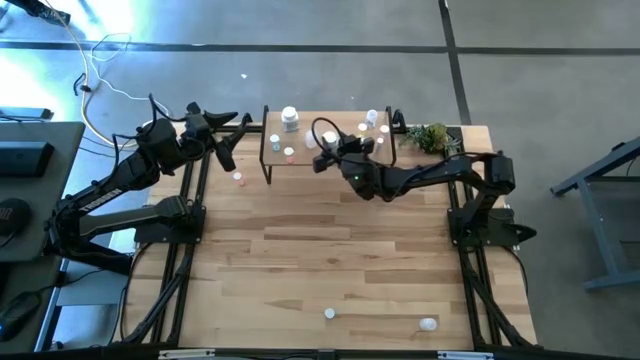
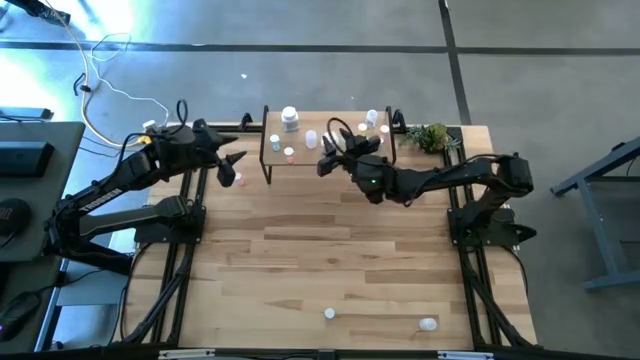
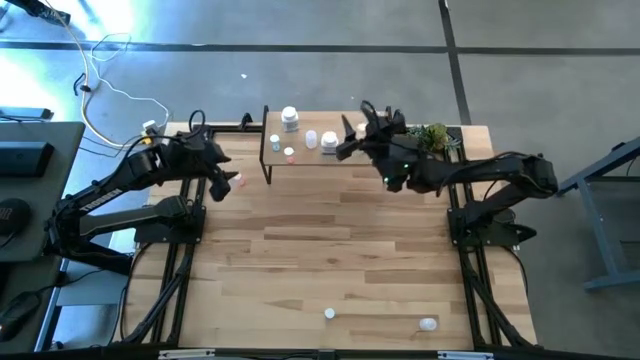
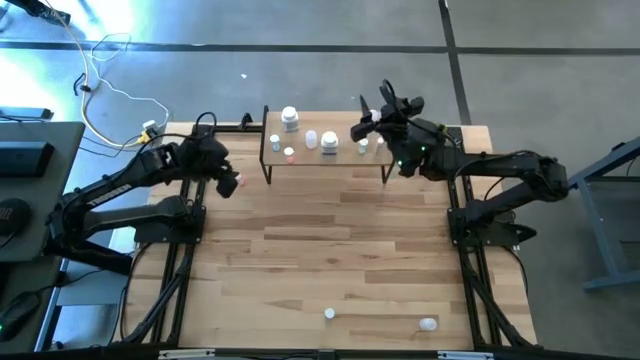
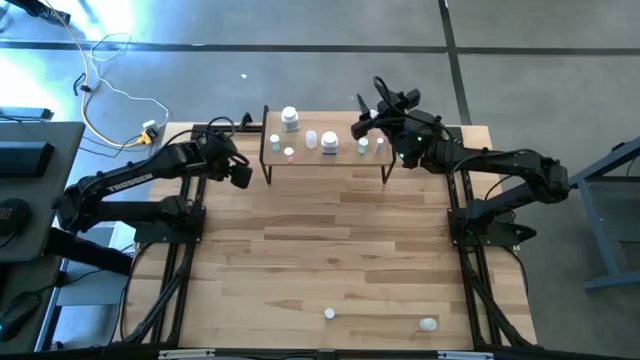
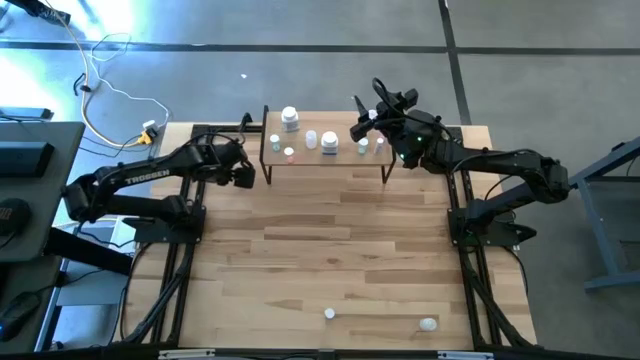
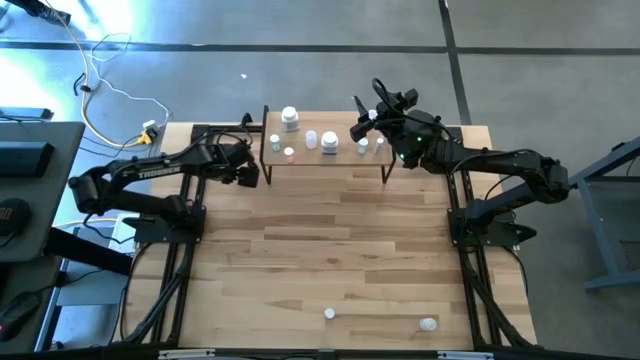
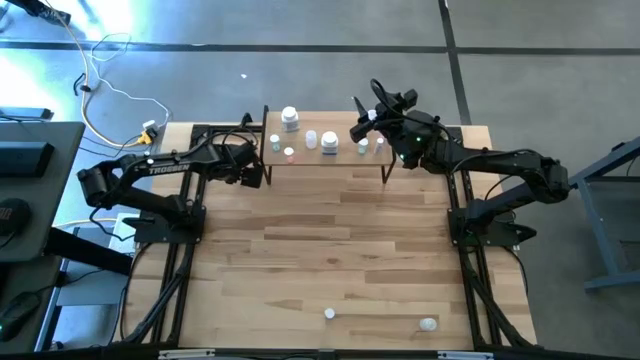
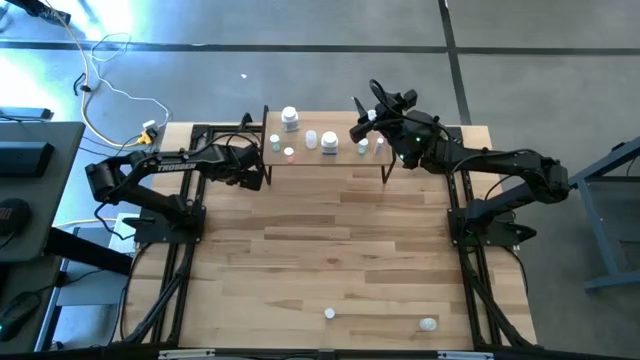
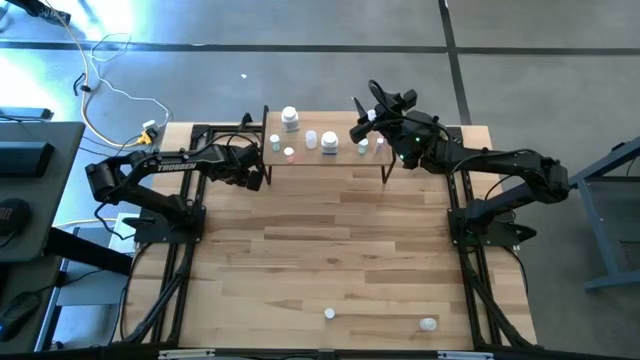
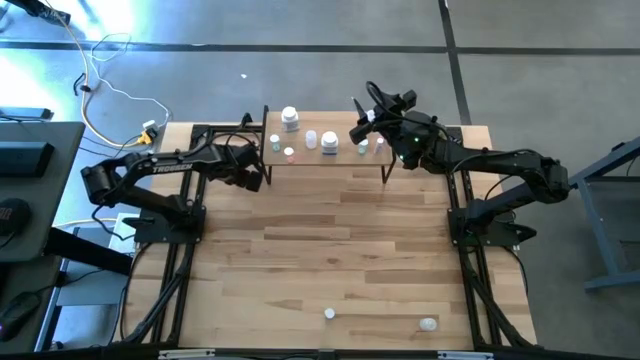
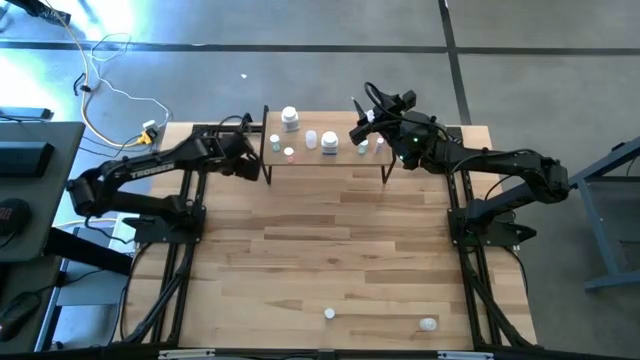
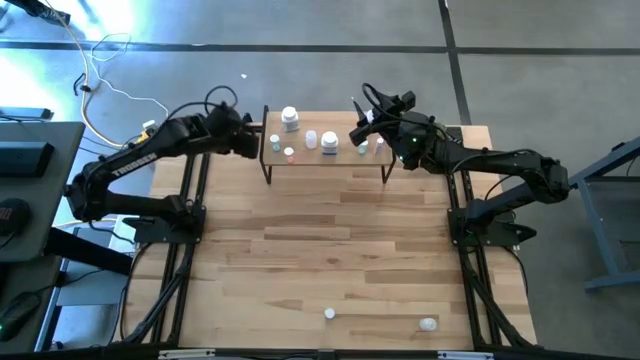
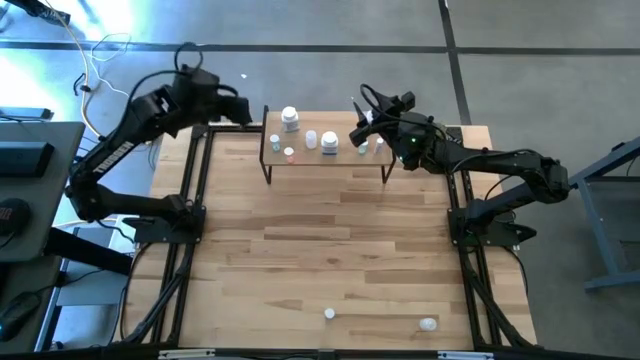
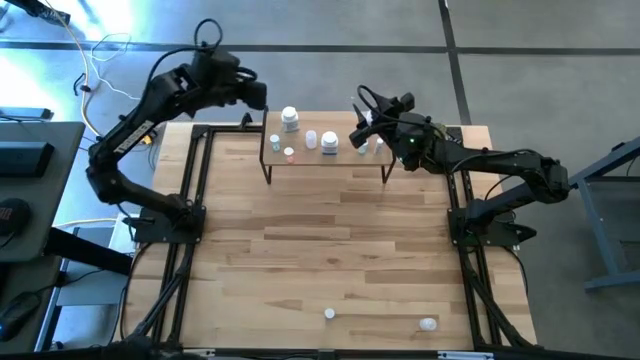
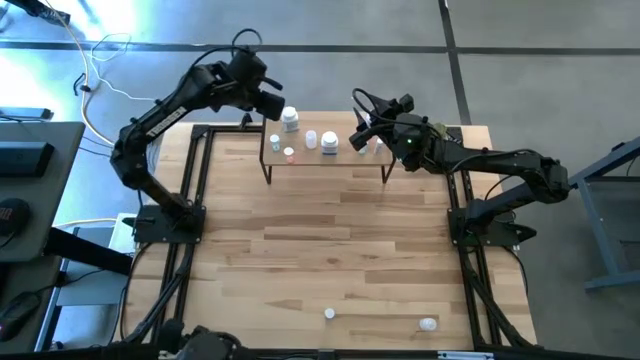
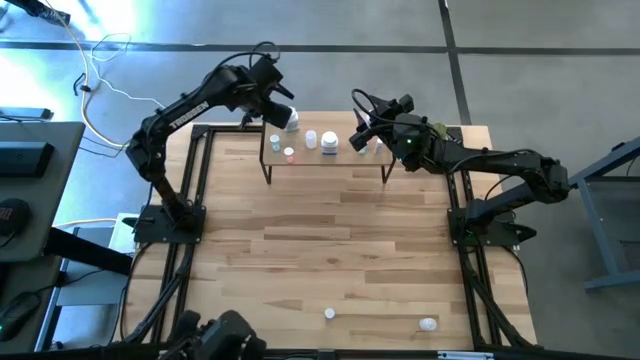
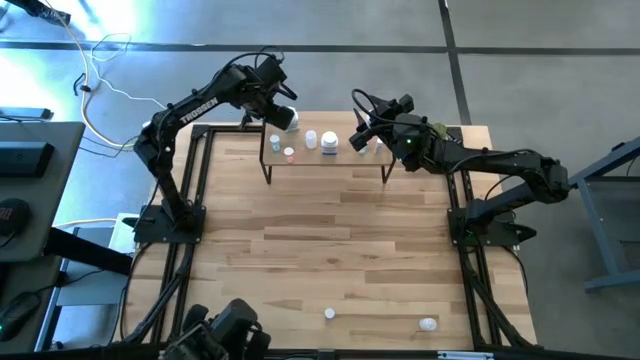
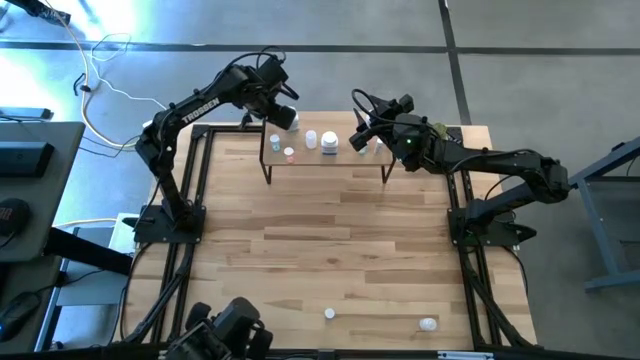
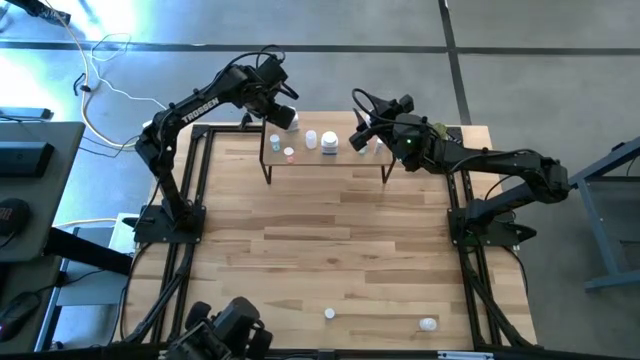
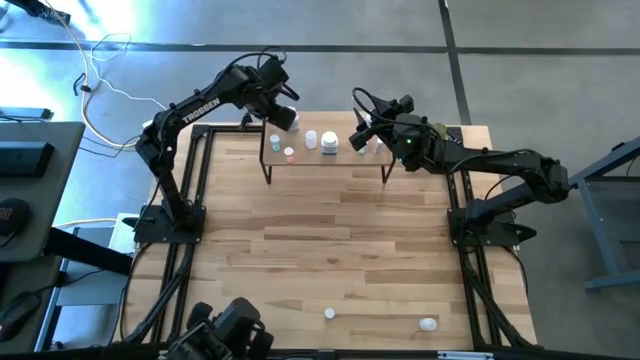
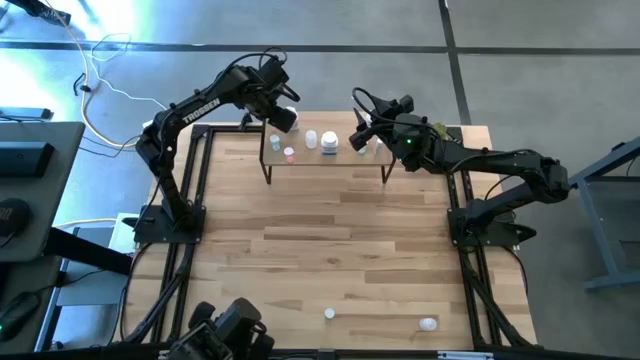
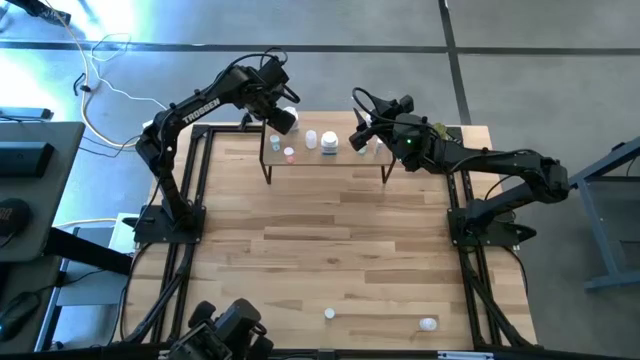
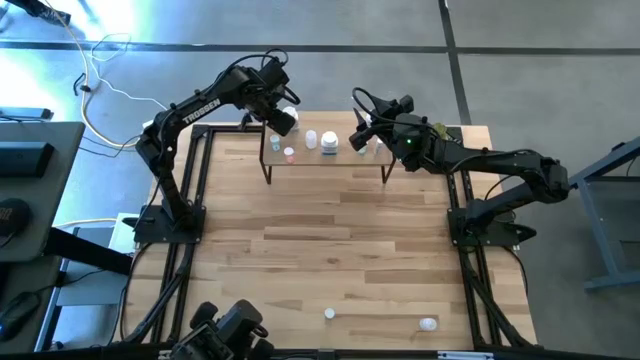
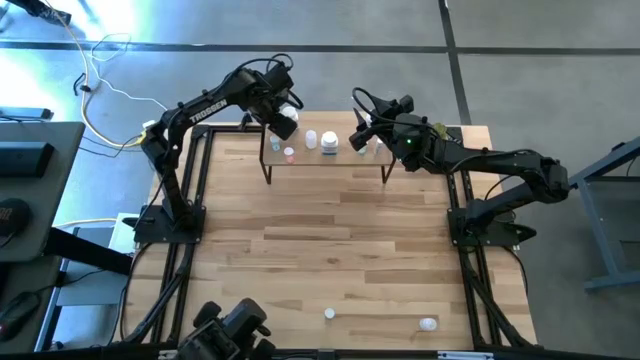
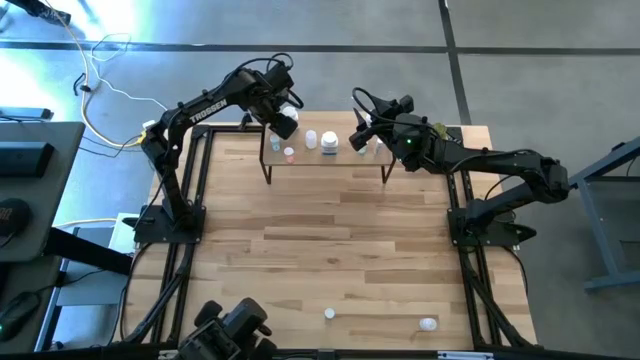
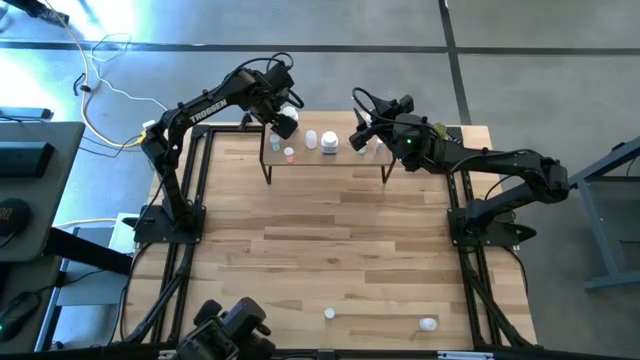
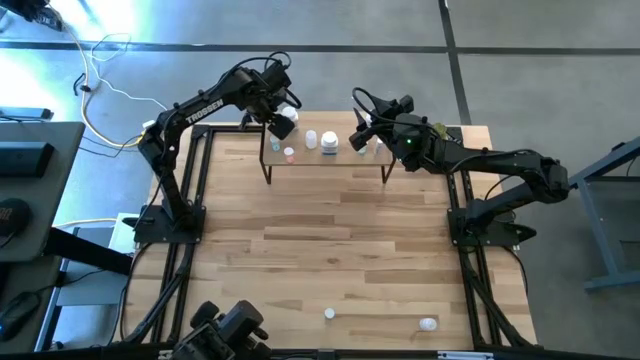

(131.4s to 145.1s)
Task: Pick and place medicine bottles onto shelf by color
Put the pink pill bottle on the shelf

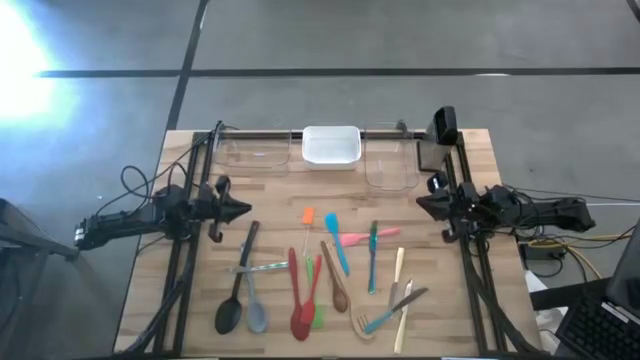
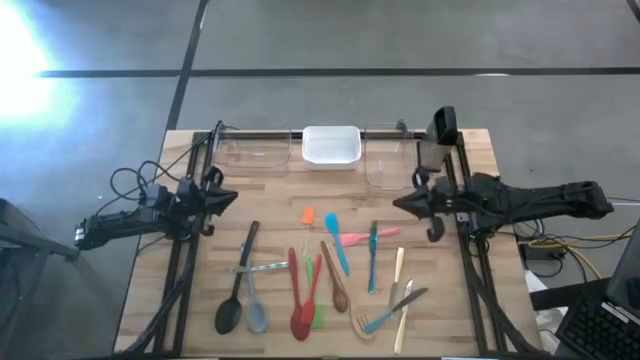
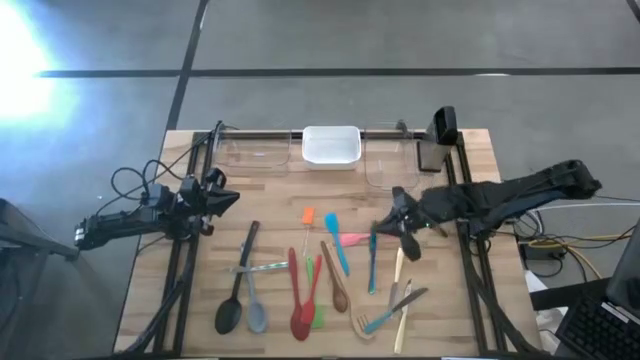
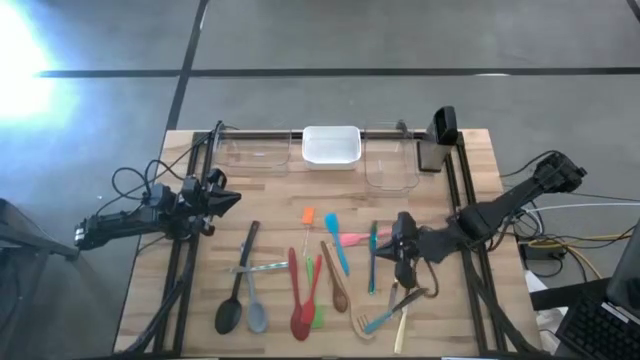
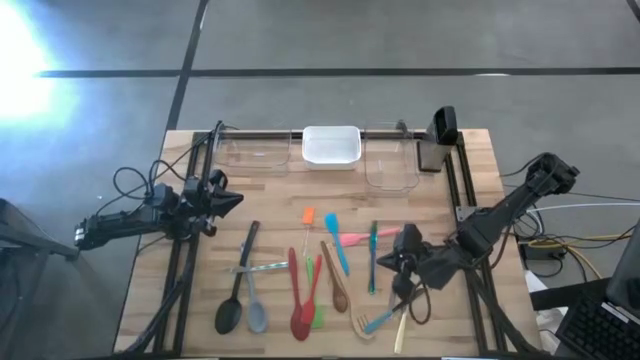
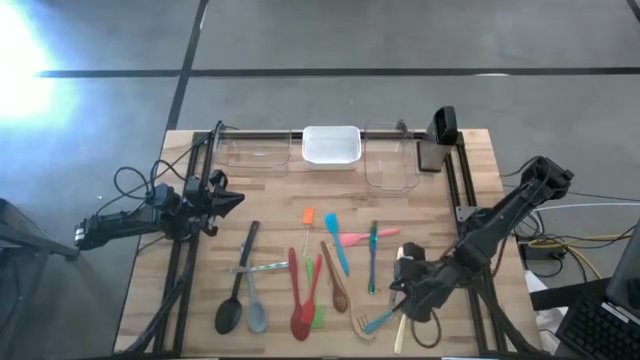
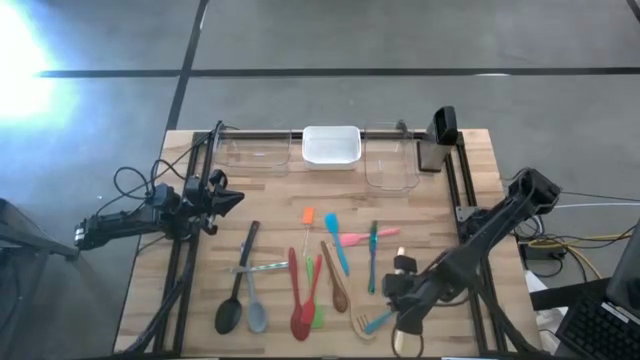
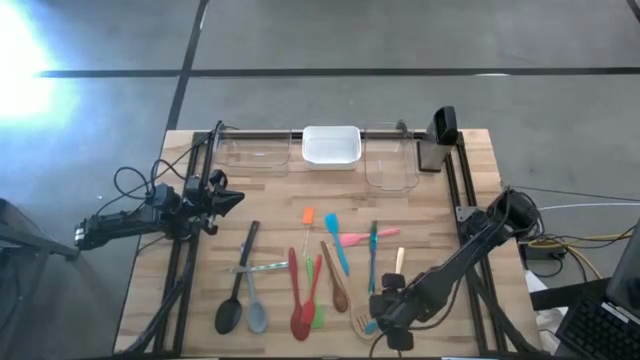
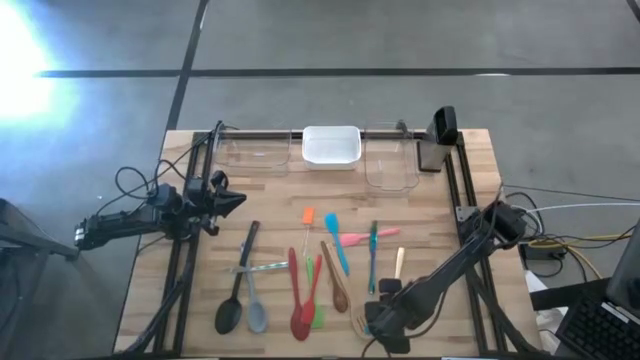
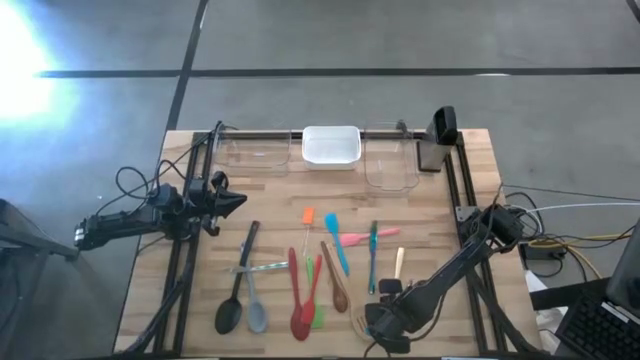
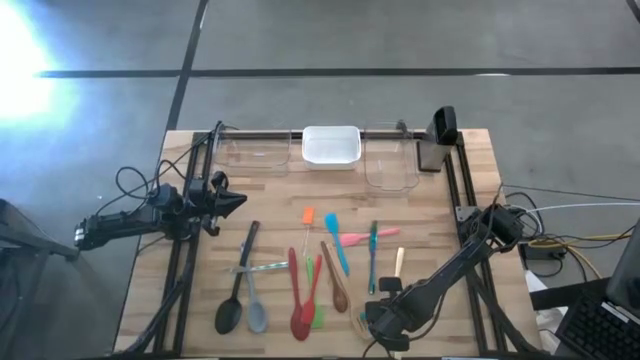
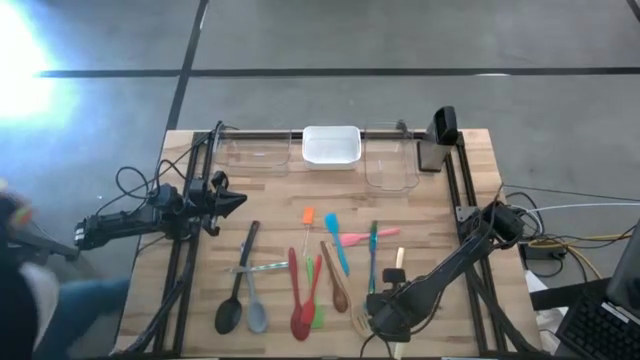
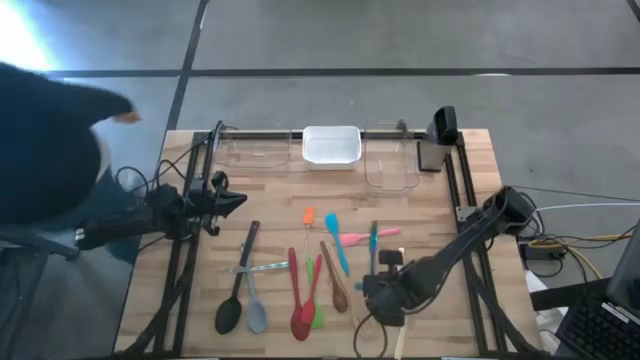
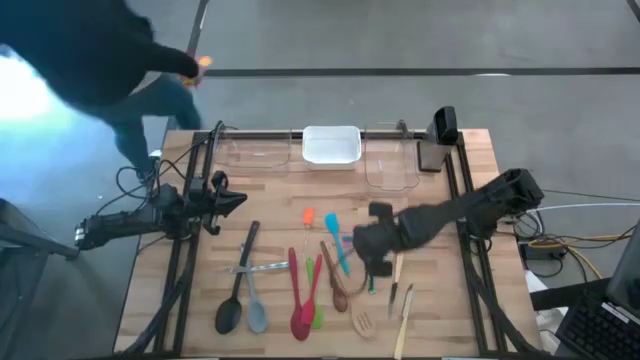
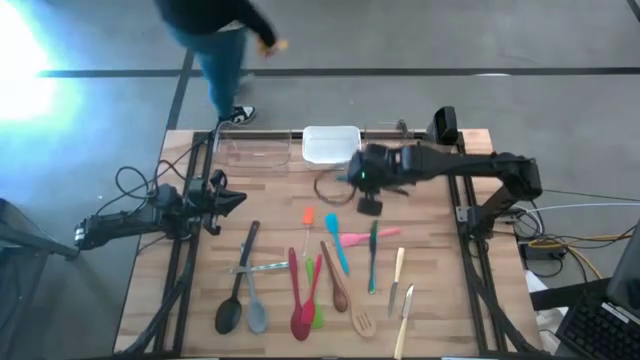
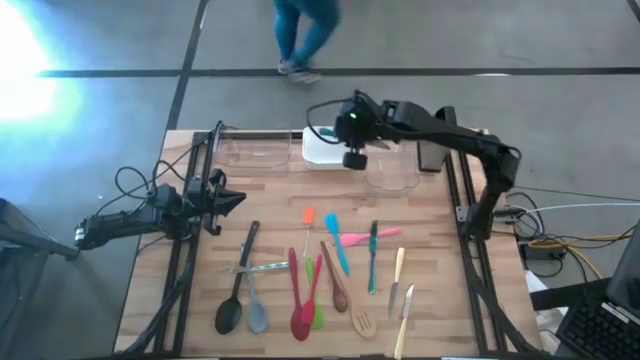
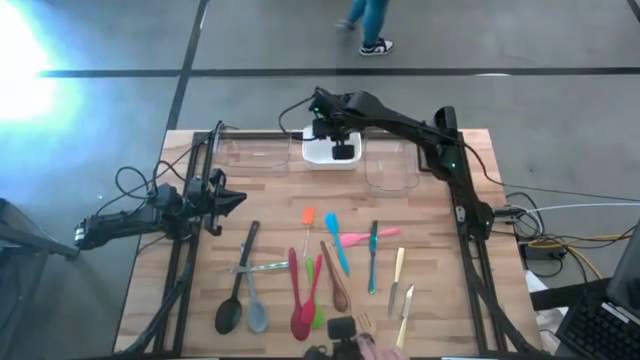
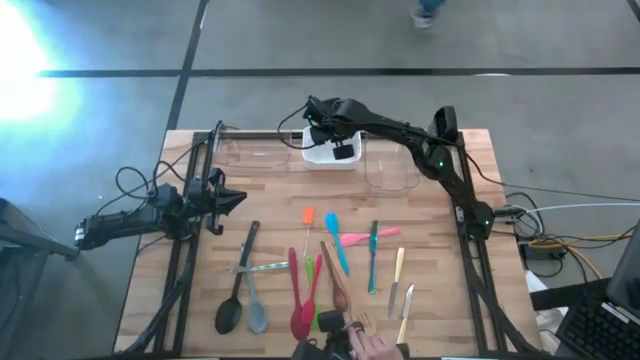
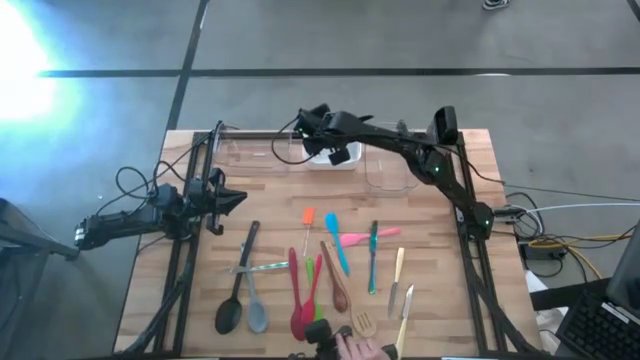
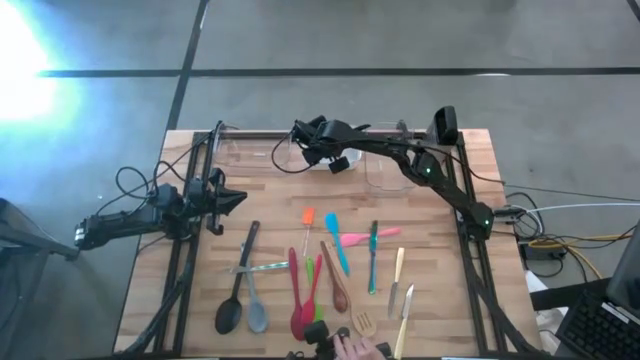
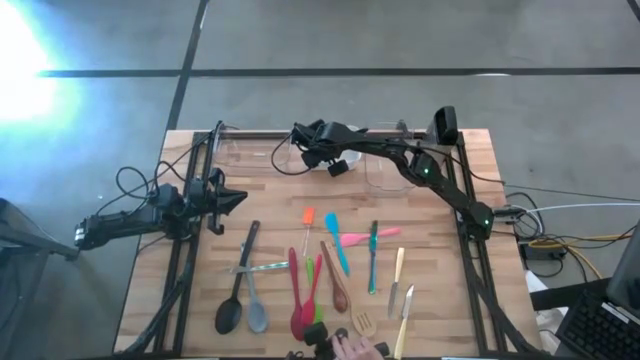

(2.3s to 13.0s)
Task: Pick & Place Kitchen Items
Put the blue table knife into the white bin
